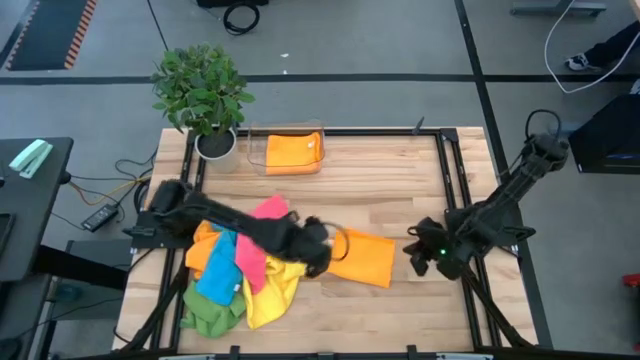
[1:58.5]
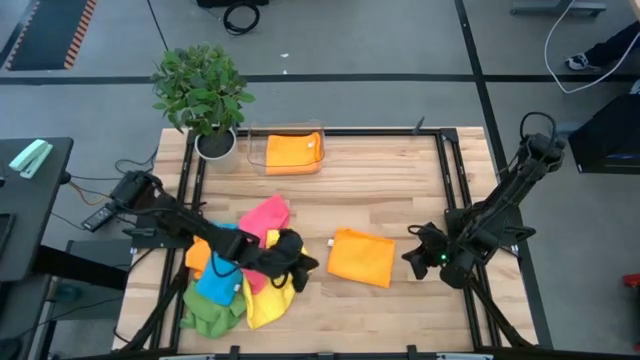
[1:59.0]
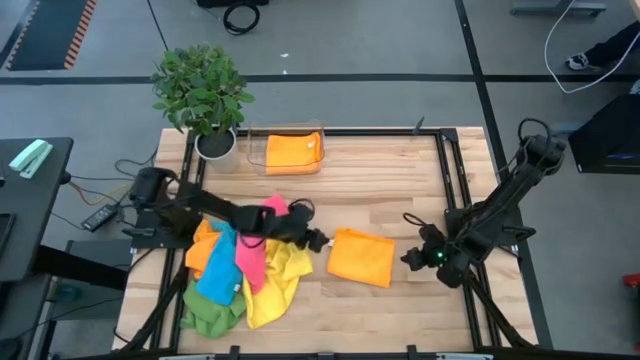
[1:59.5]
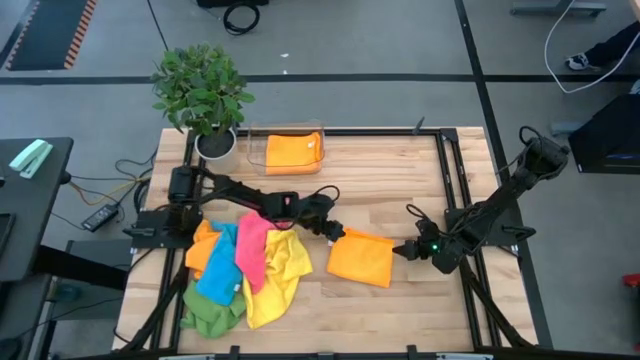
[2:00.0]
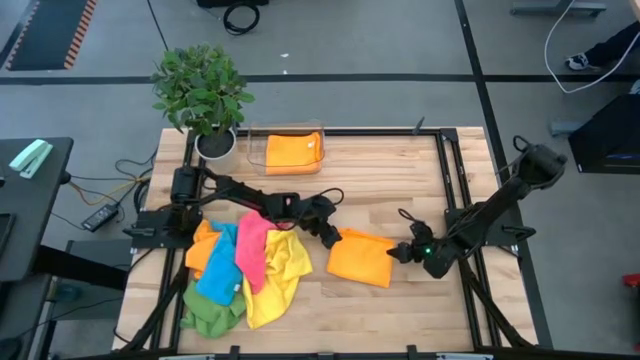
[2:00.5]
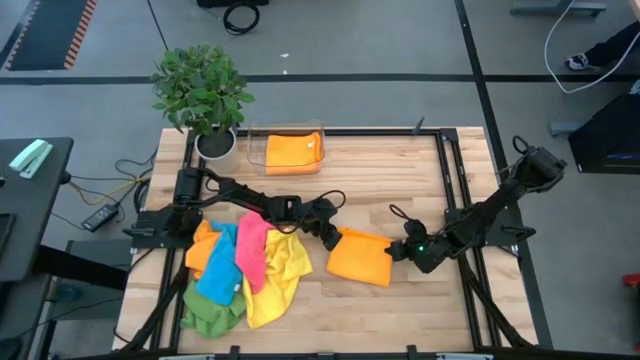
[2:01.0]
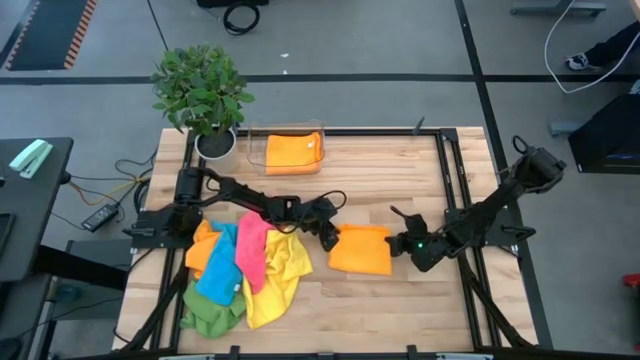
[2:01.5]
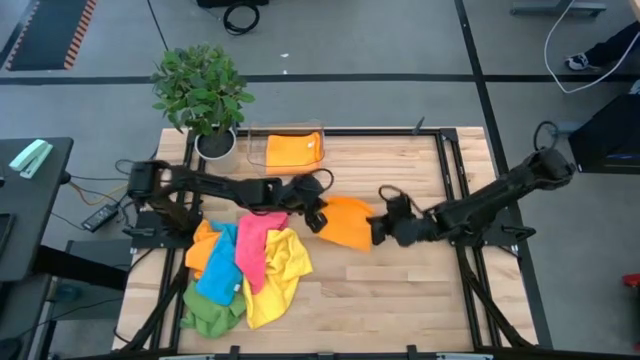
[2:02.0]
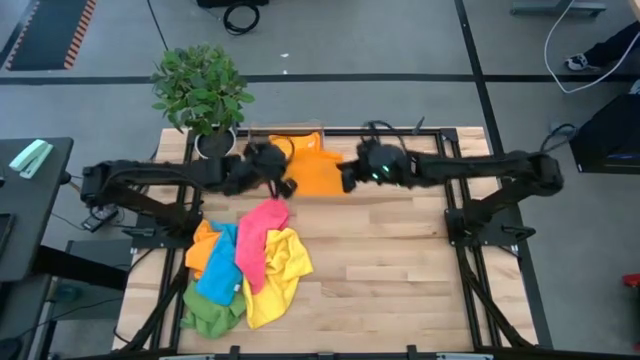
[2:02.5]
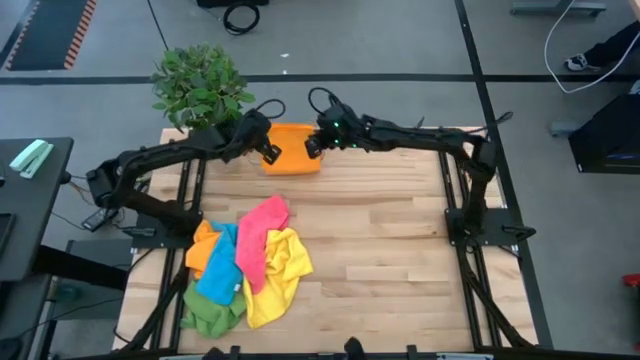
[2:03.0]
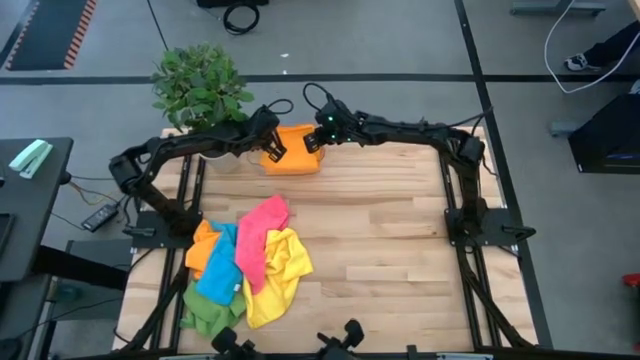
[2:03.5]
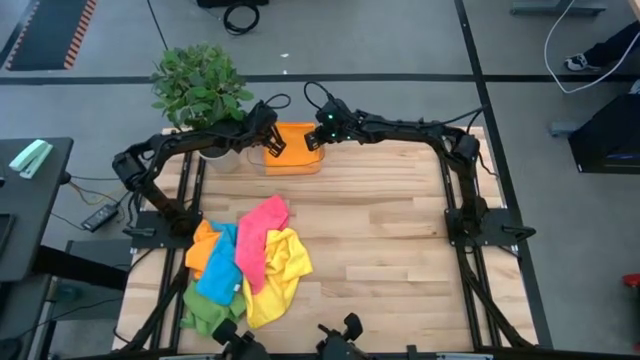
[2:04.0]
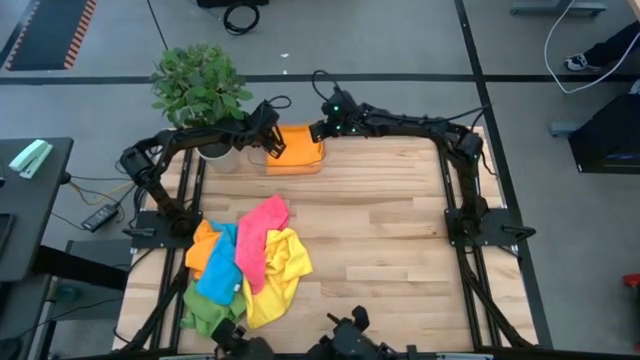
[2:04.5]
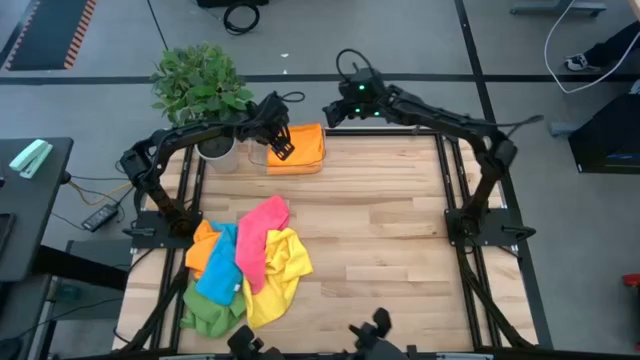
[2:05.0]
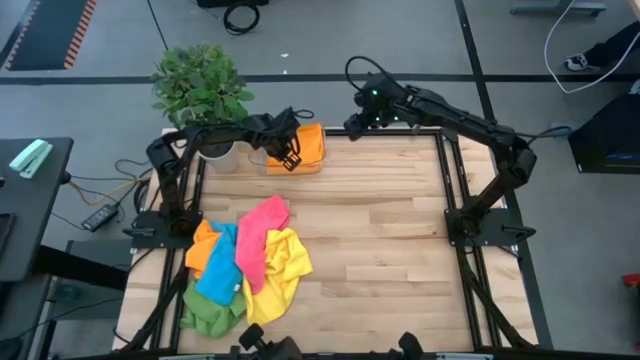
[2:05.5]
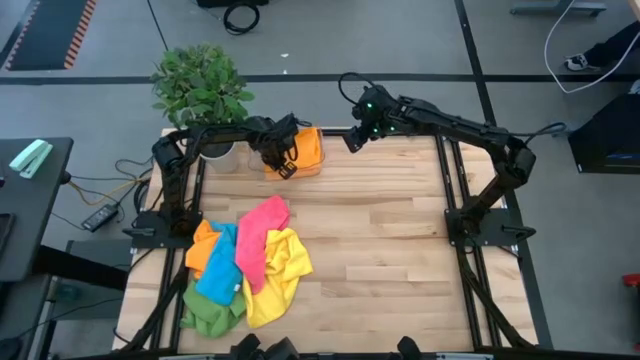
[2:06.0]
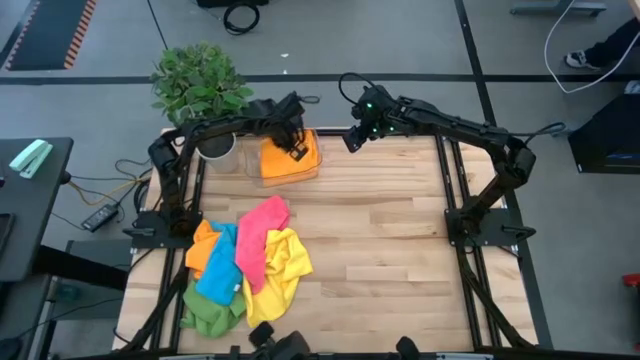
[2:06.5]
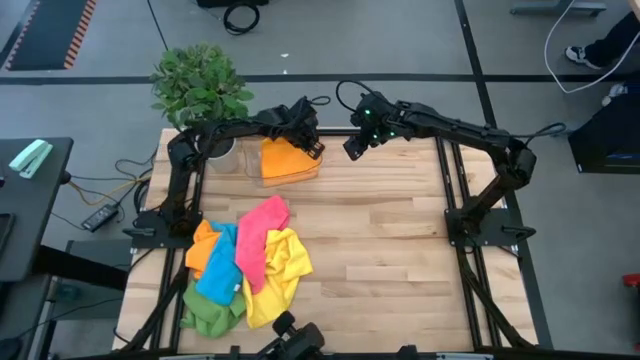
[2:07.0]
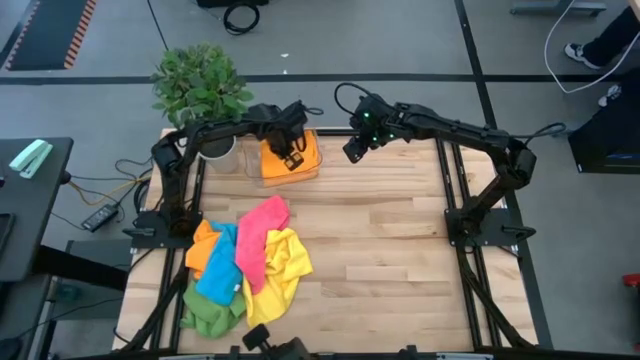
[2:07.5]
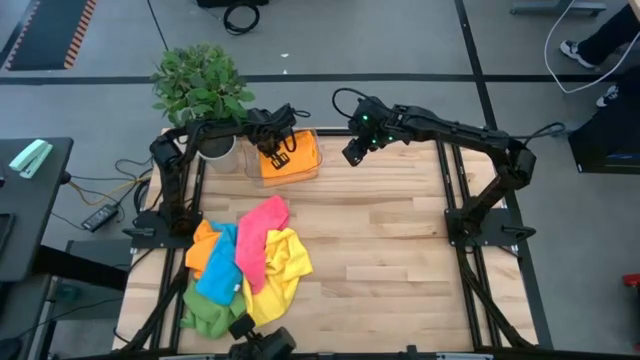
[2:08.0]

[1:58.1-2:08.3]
Task: Fold microfiber towels
Stack the folded right orange microfiber cloth on top of the orange microfiber cloth in the transparent bin

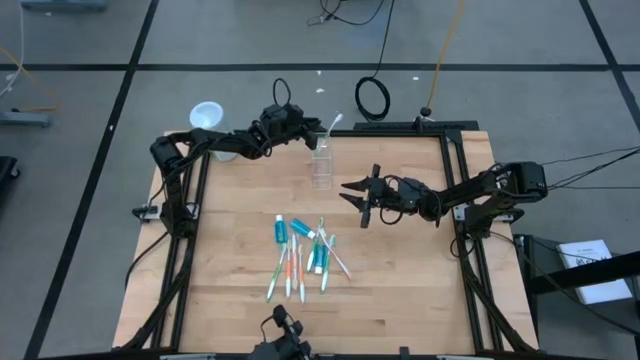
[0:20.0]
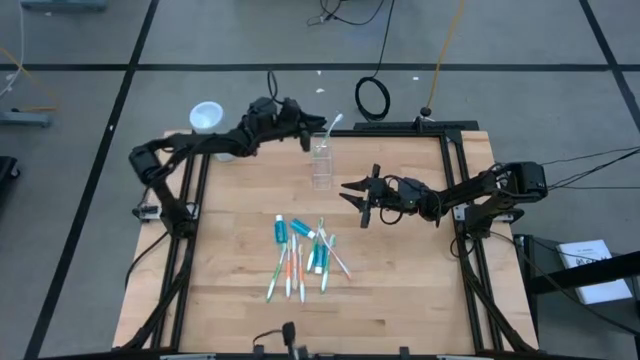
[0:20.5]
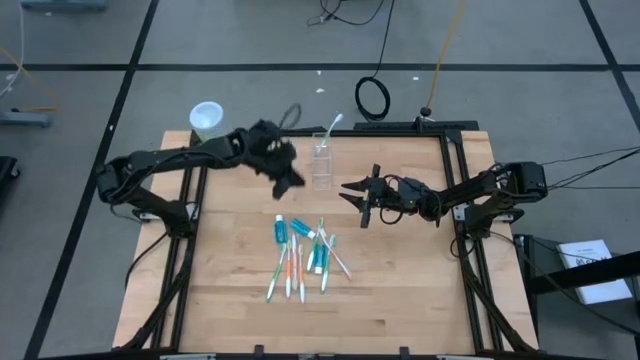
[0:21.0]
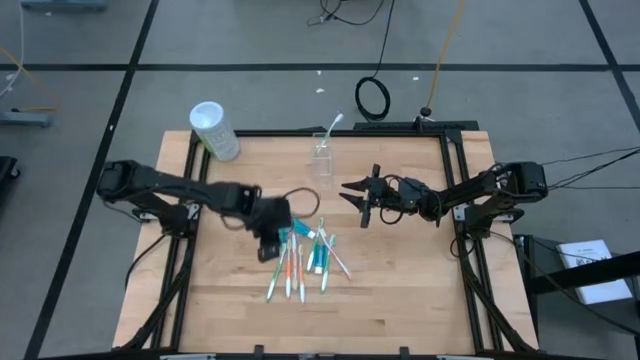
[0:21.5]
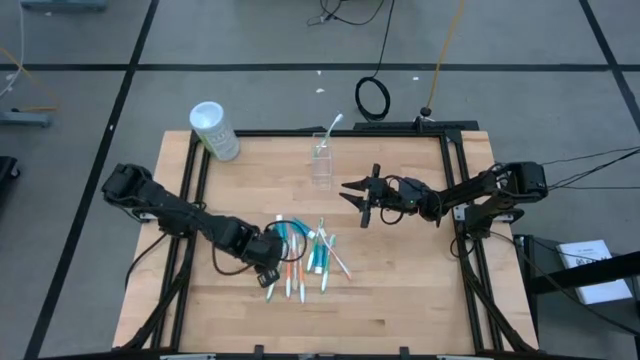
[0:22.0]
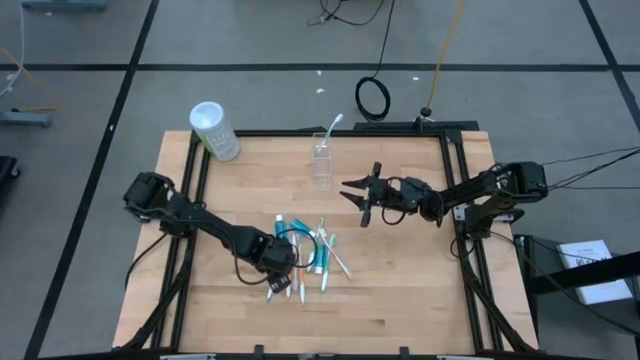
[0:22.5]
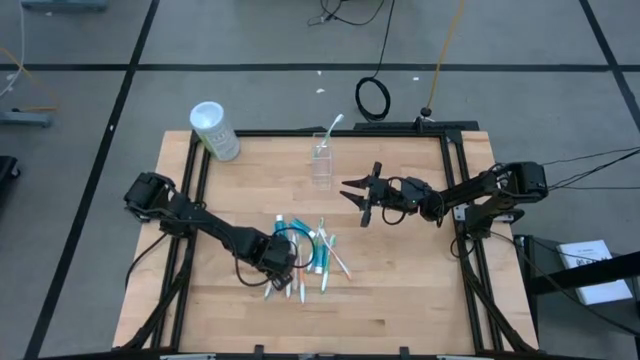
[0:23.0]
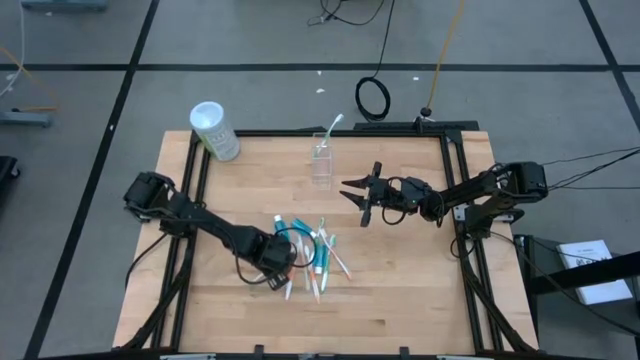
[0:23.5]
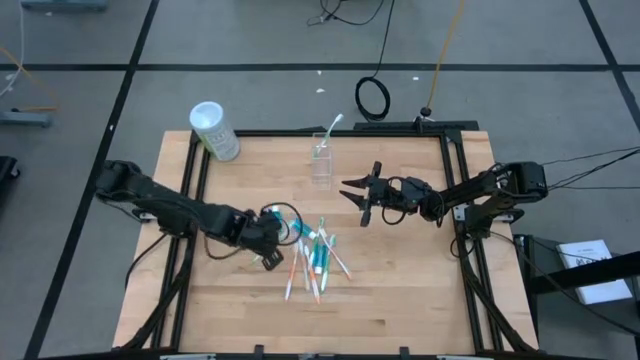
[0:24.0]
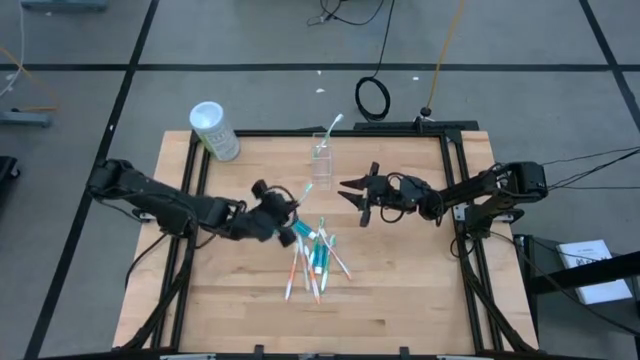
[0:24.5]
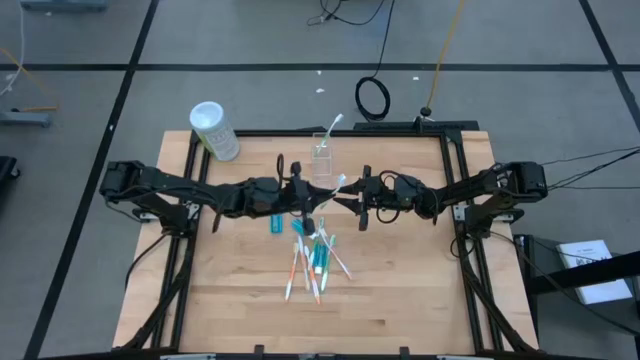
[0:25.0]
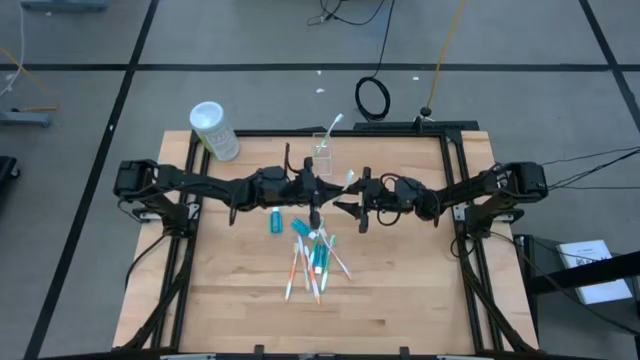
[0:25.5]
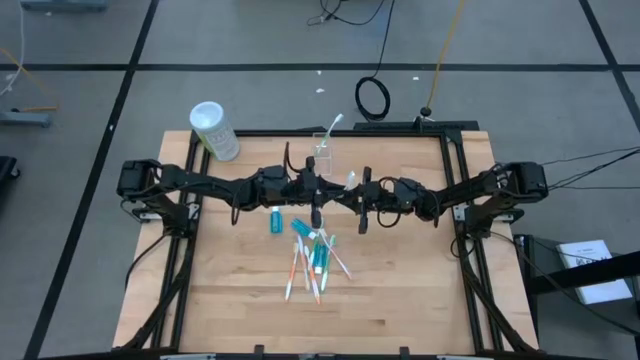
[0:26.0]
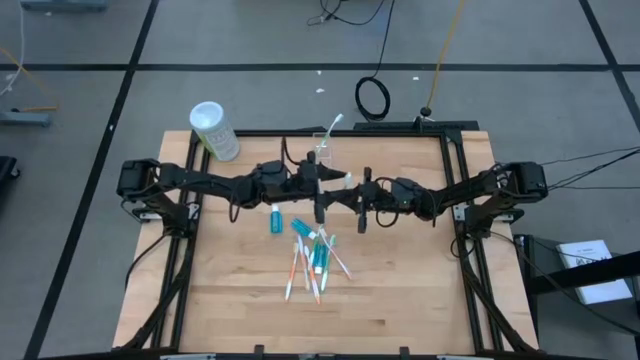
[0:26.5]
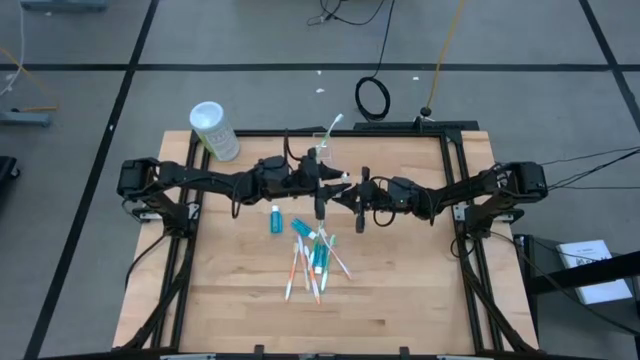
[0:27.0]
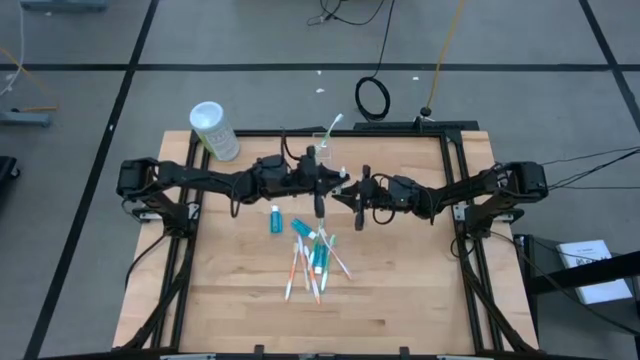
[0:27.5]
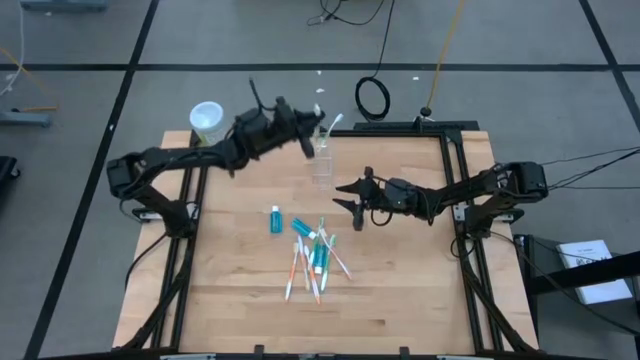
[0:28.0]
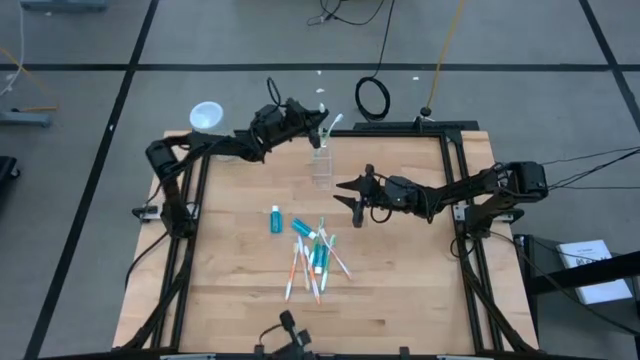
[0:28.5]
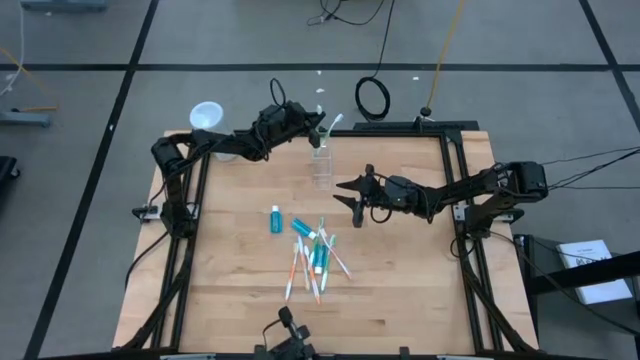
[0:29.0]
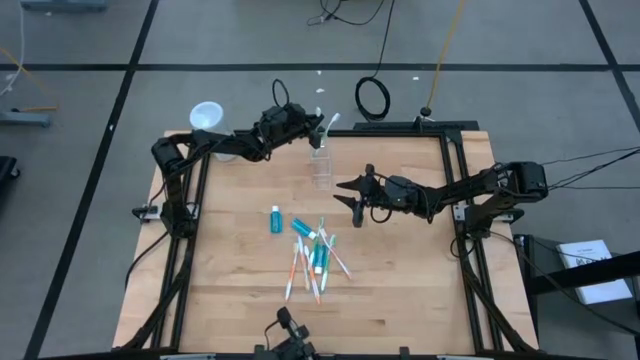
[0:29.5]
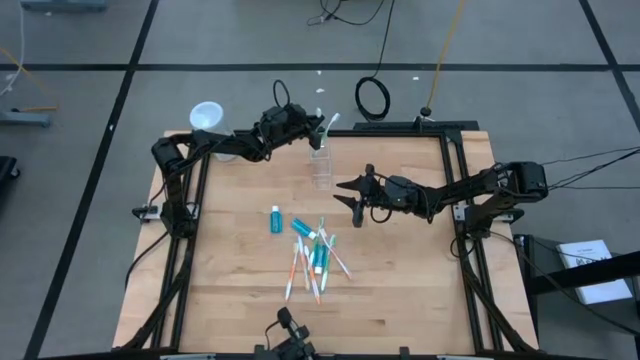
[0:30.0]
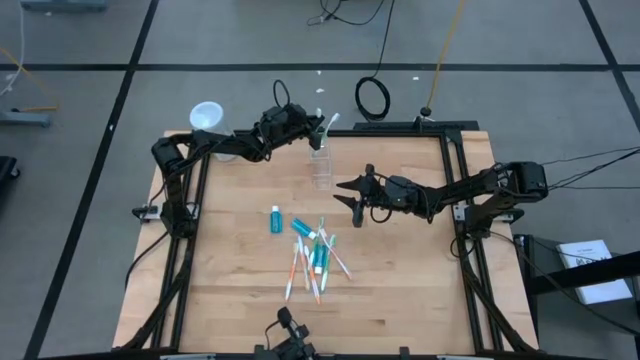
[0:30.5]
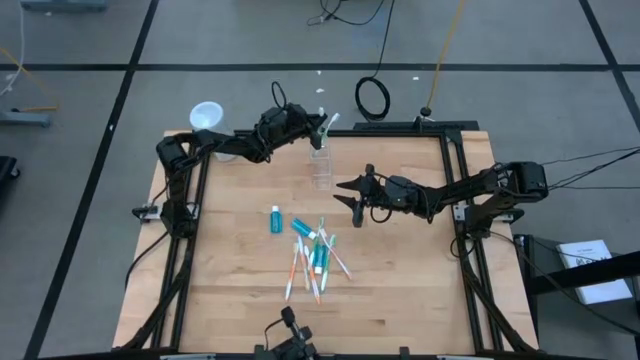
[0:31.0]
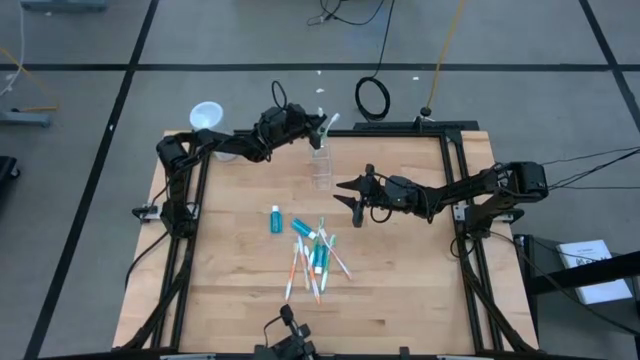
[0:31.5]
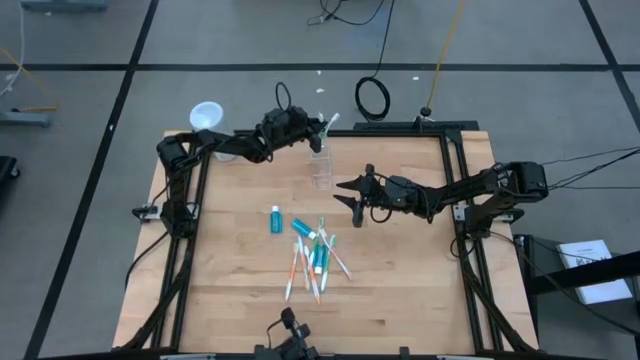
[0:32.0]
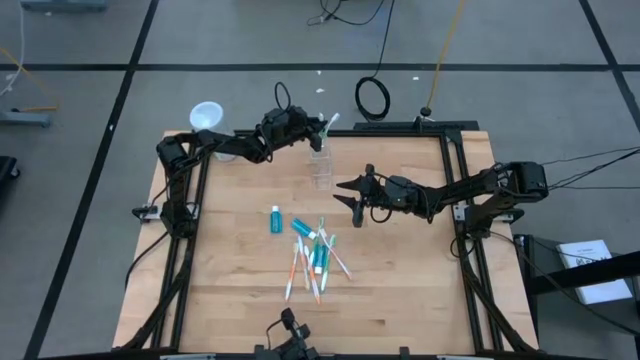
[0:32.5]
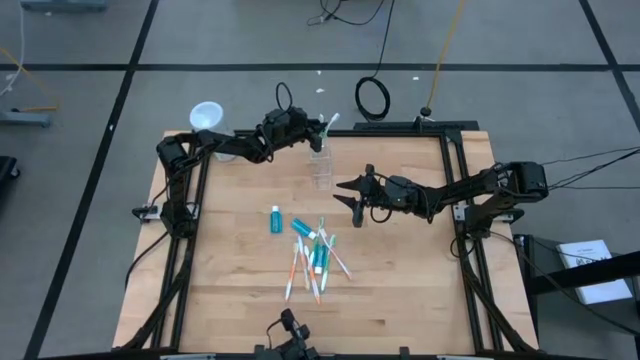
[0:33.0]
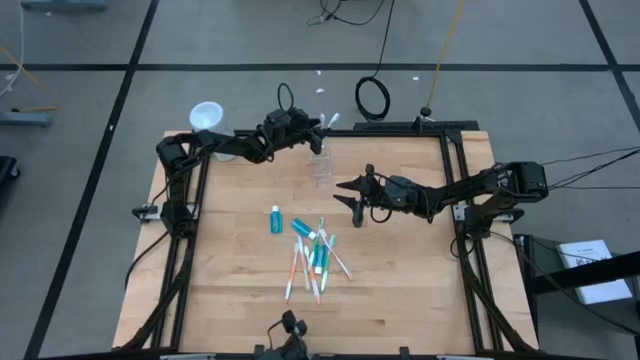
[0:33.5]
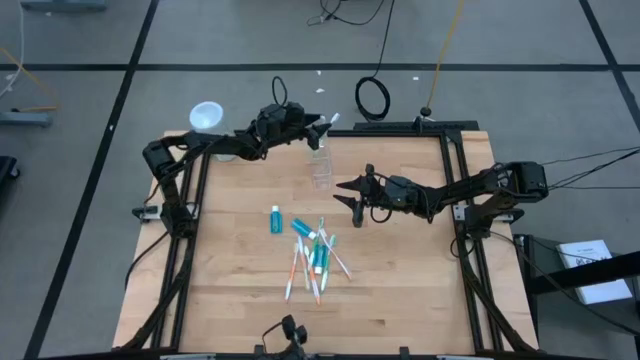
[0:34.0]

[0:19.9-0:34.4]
Task: Pick & Place toothbrushing station
Put the green toothbrush into the transparent organizer
